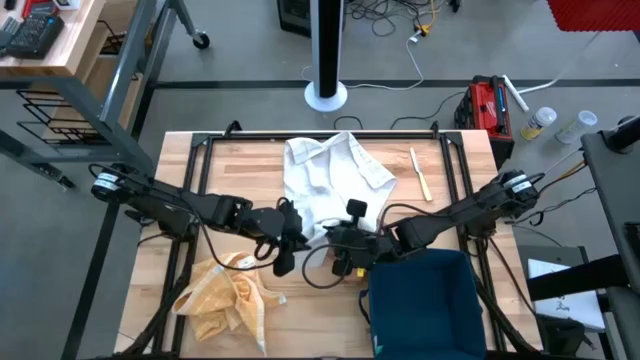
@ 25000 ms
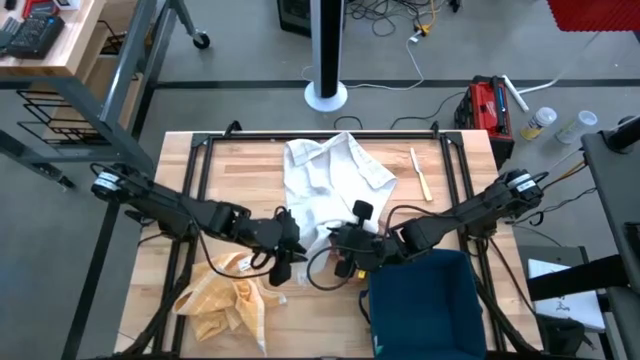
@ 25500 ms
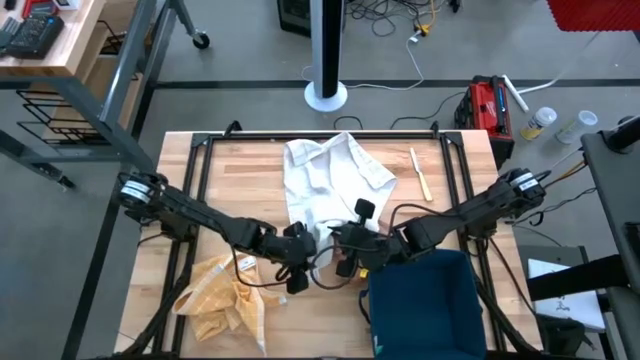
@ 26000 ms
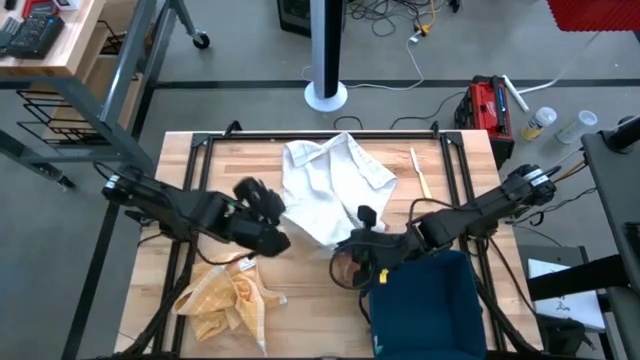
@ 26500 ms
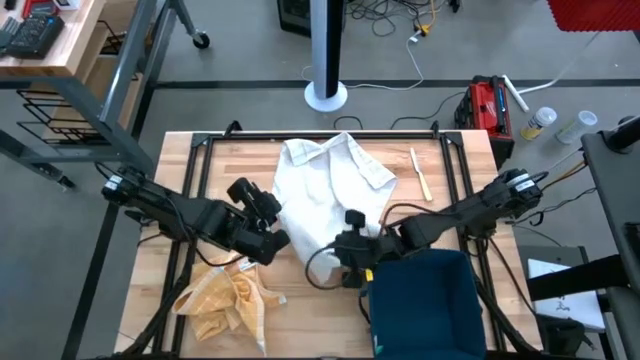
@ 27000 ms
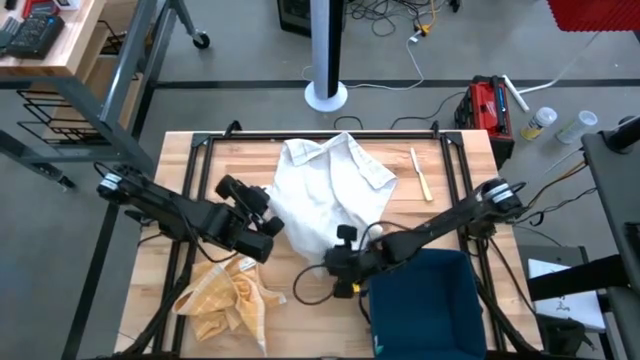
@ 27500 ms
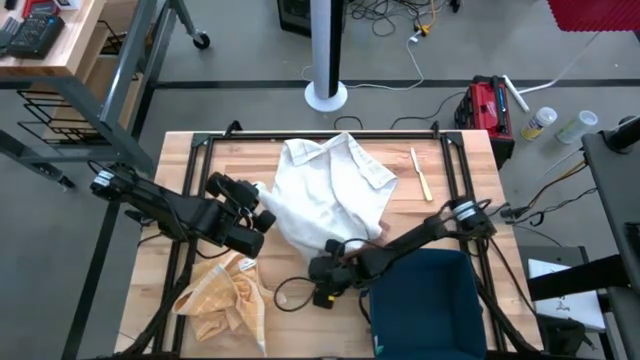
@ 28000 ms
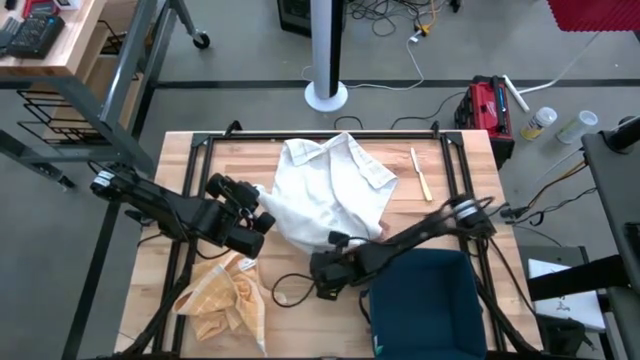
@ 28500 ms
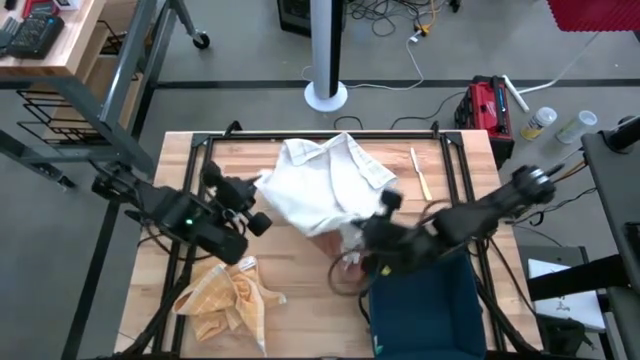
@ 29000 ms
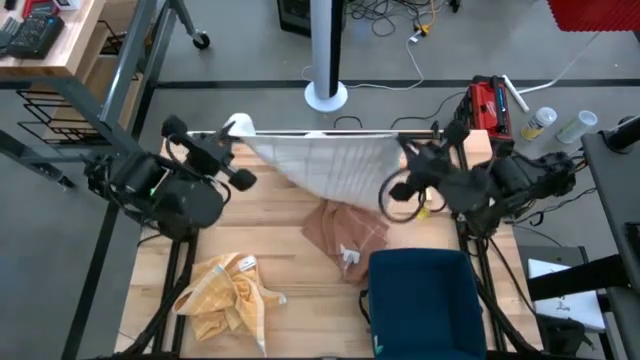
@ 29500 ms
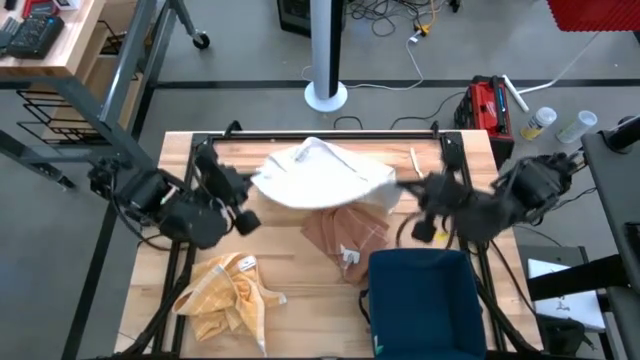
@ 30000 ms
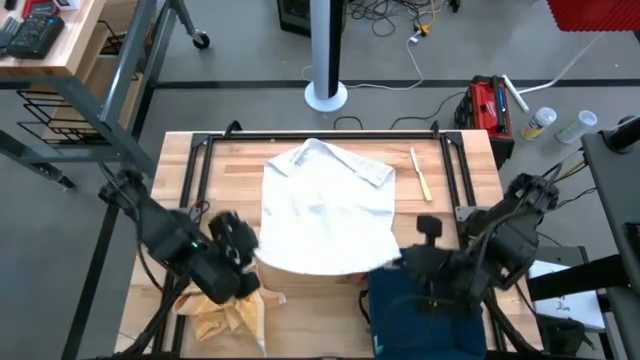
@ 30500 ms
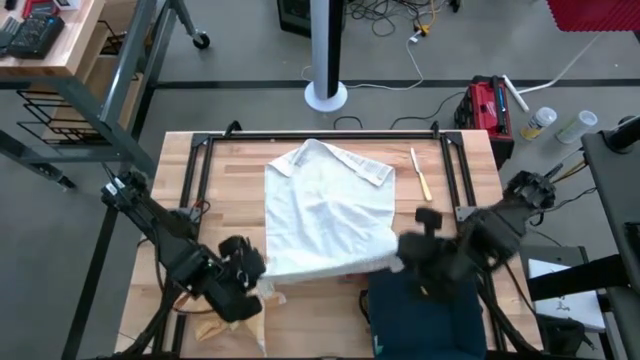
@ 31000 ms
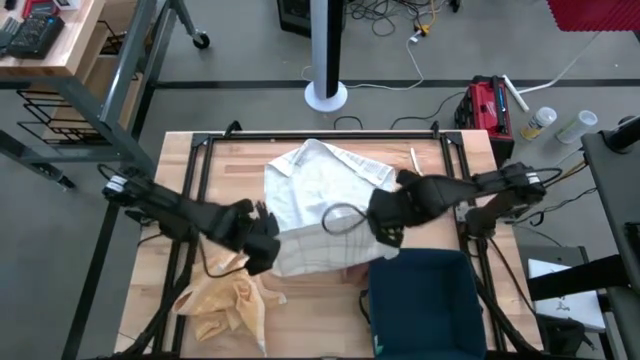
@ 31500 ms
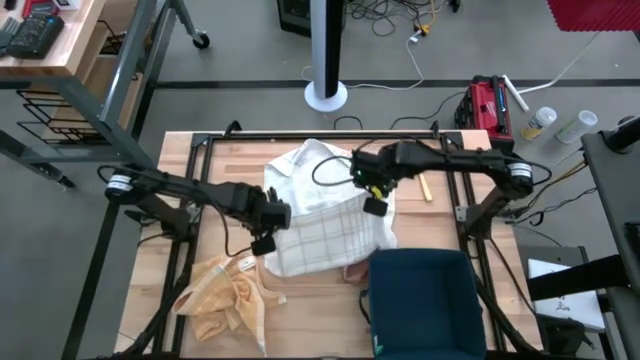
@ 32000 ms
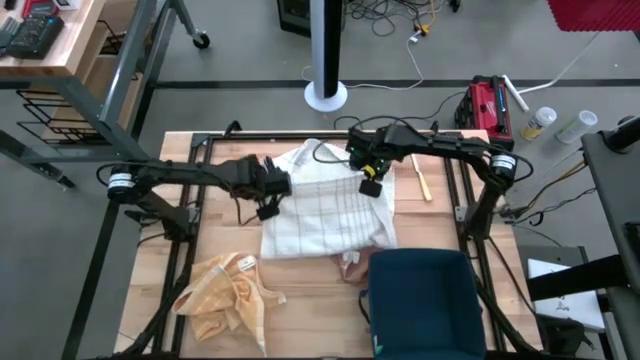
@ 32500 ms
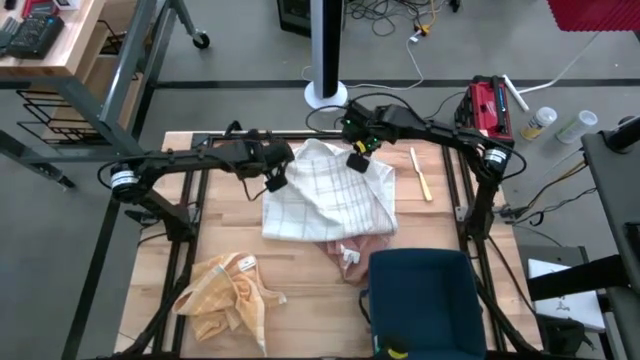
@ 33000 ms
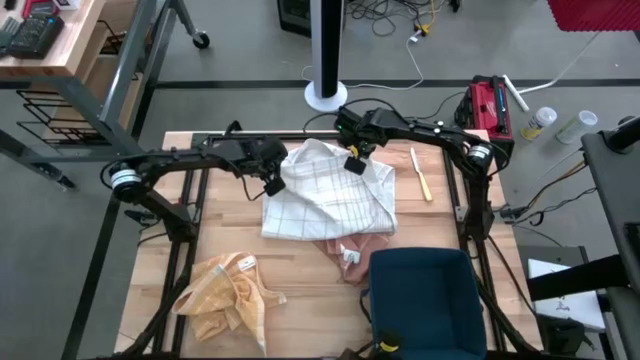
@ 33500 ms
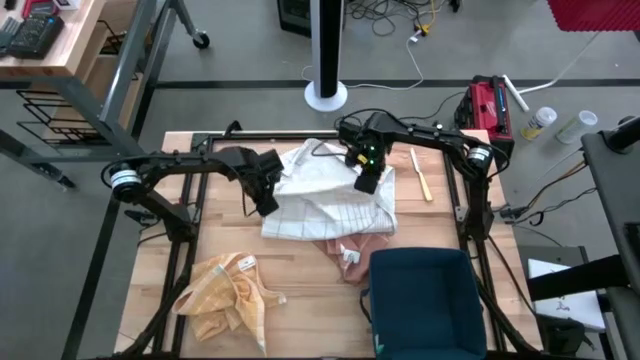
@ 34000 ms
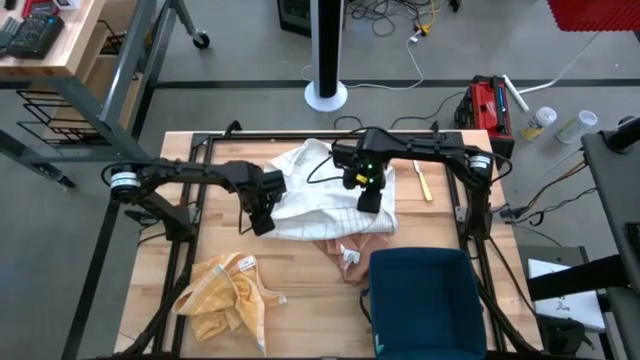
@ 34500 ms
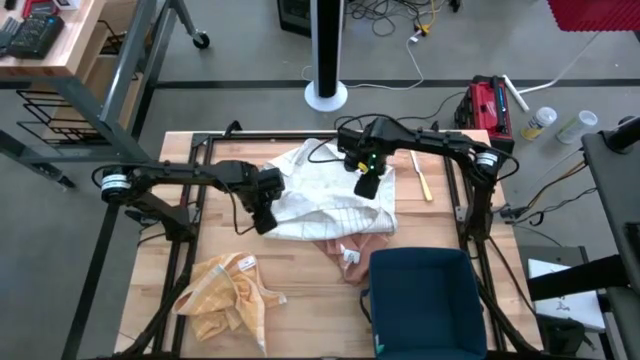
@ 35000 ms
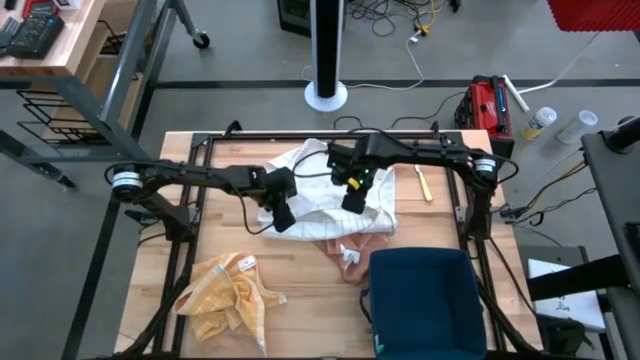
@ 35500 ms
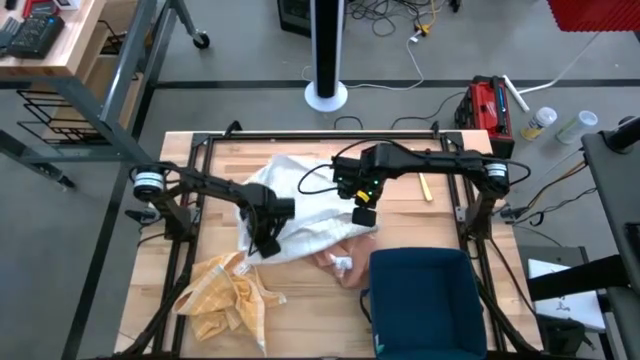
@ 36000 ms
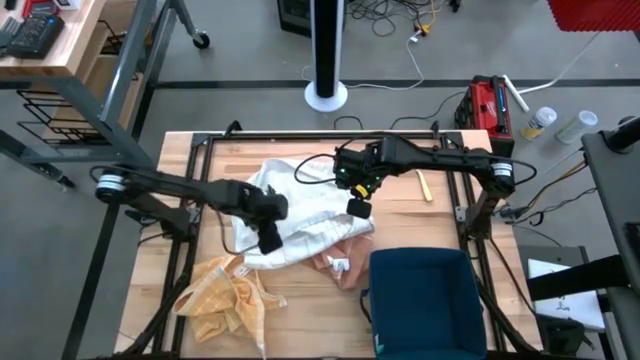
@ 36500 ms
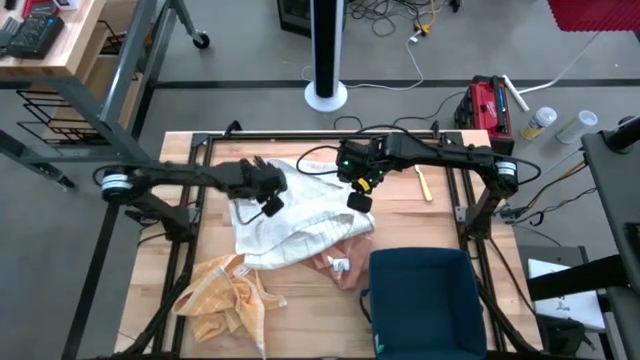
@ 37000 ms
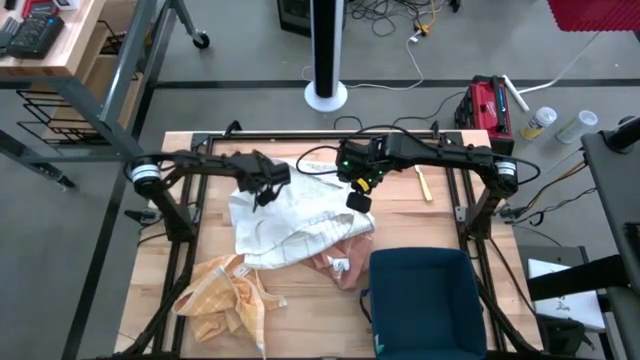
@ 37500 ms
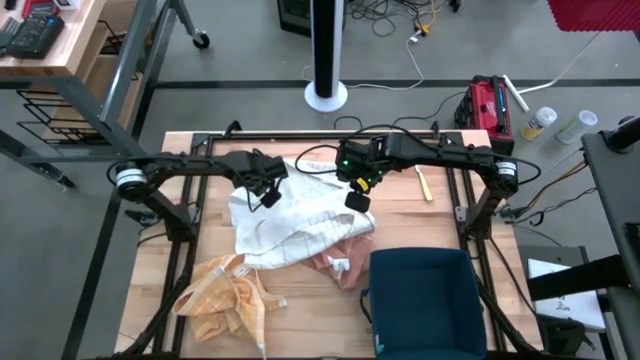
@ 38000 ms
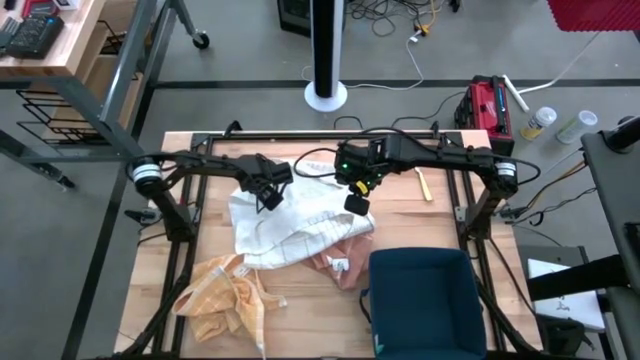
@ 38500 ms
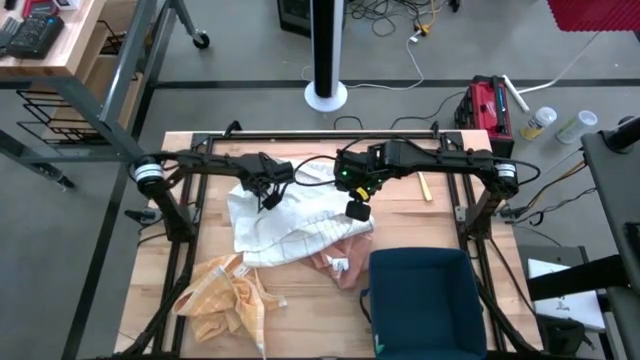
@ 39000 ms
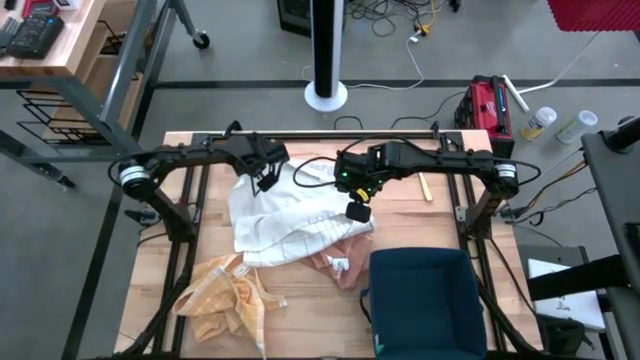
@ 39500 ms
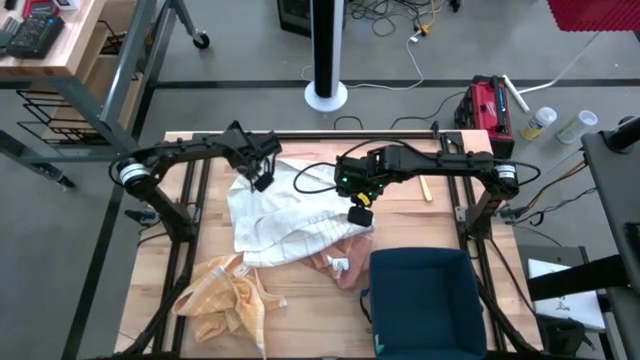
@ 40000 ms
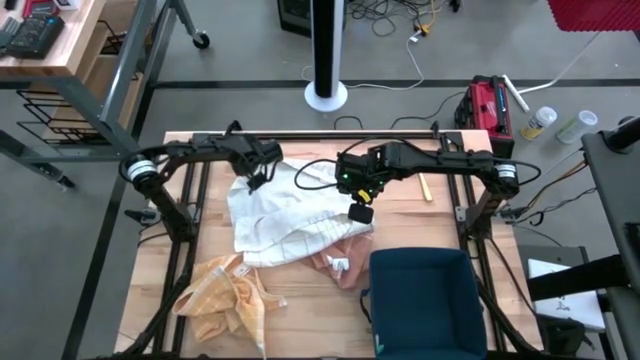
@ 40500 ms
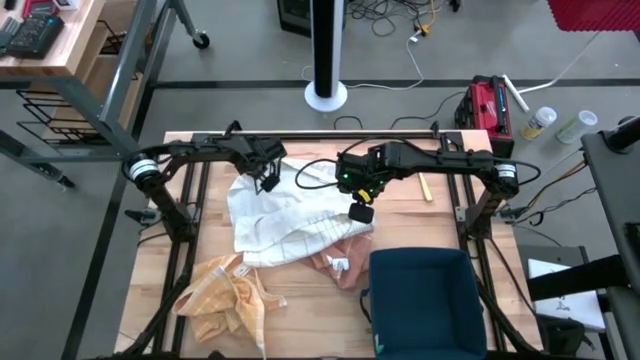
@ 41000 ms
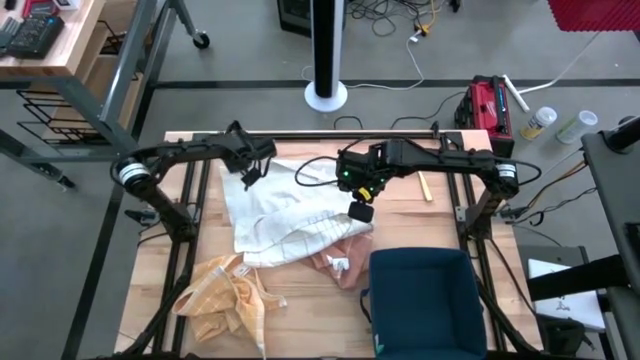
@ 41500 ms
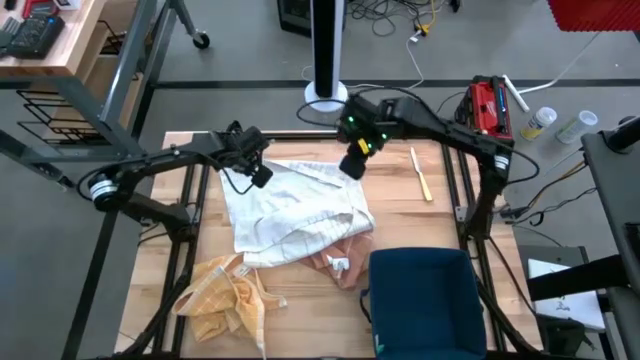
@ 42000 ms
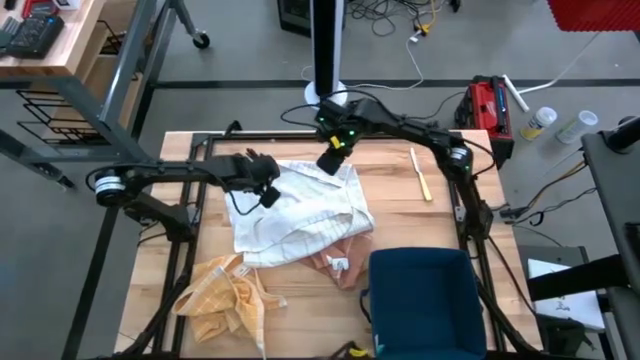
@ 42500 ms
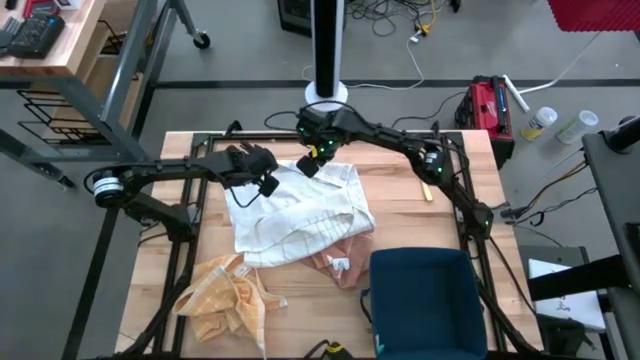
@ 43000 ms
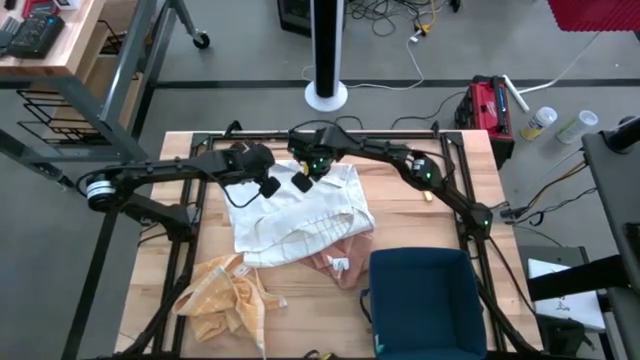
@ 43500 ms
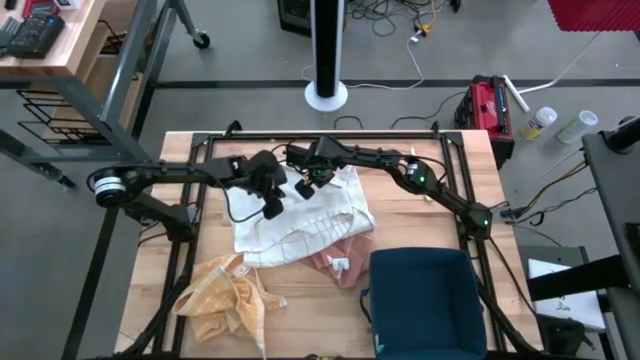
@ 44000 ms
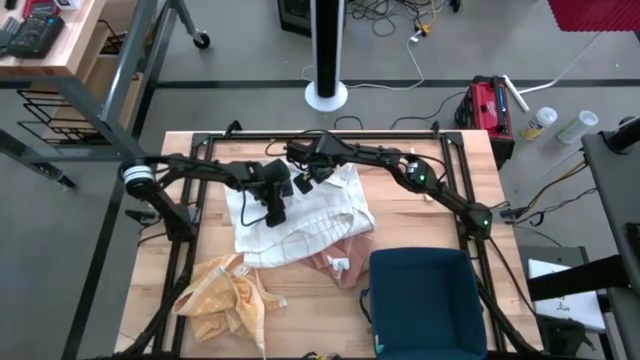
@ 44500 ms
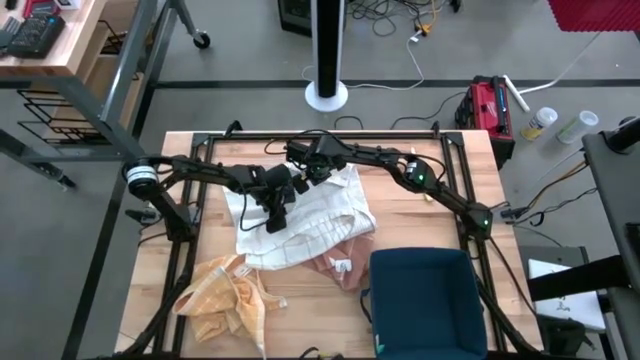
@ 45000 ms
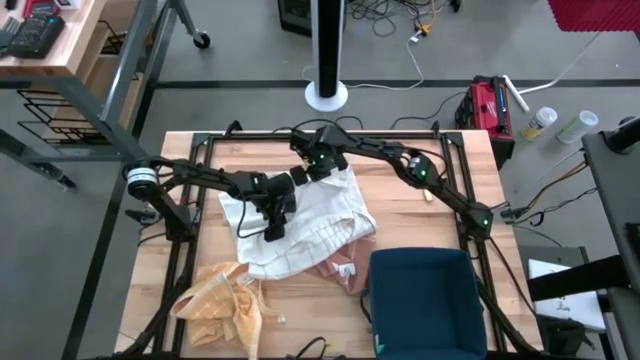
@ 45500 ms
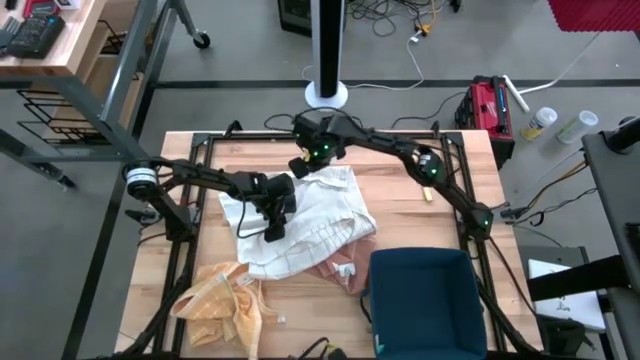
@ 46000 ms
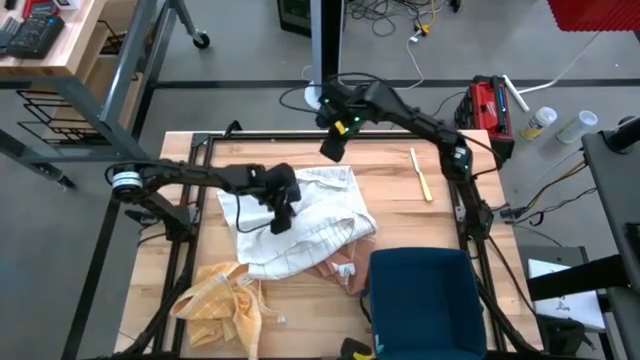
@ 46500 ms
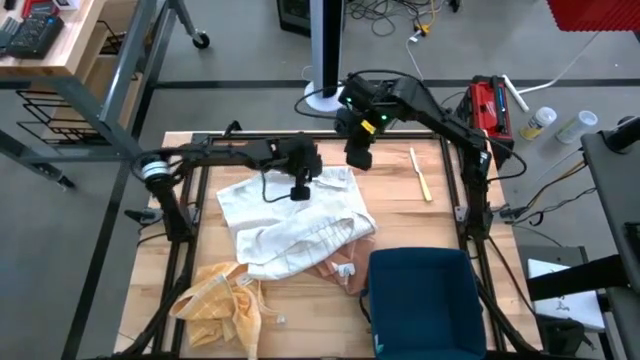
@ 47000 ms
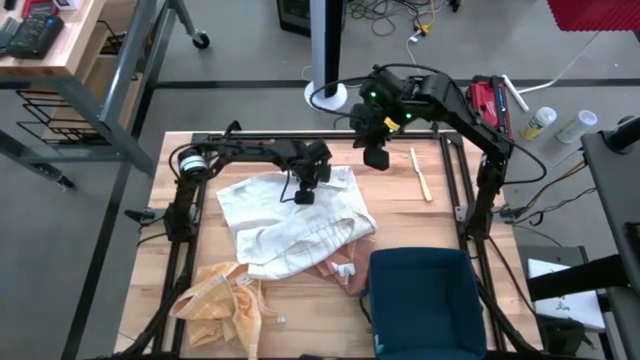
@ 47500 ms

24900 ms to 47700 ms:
Task: Fold towel
Fold the white towel
